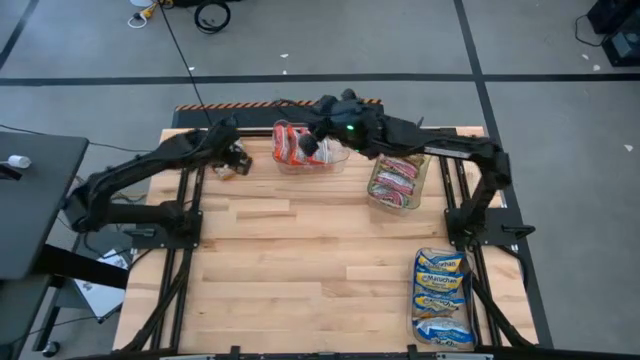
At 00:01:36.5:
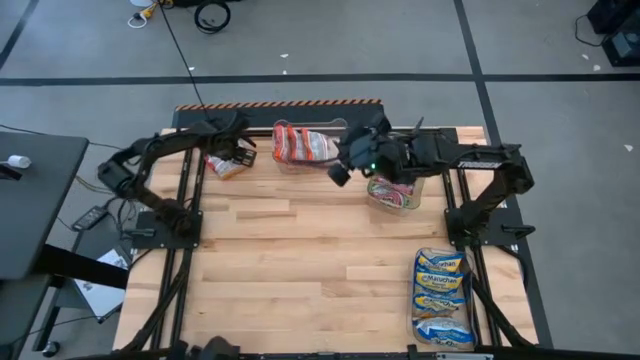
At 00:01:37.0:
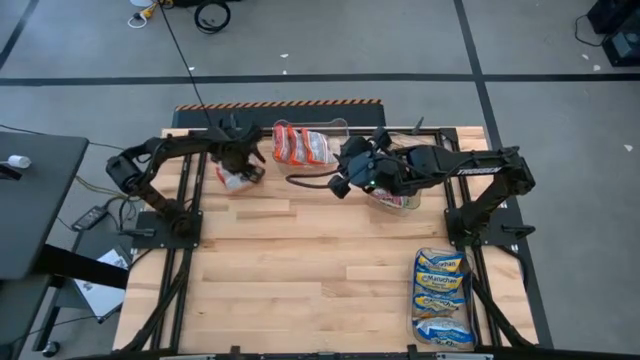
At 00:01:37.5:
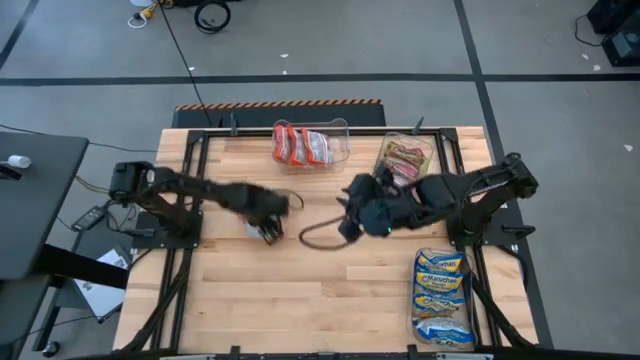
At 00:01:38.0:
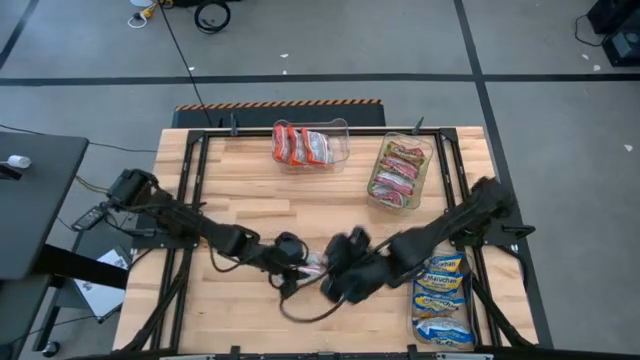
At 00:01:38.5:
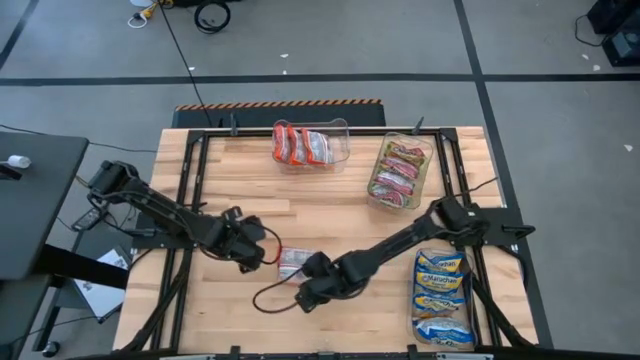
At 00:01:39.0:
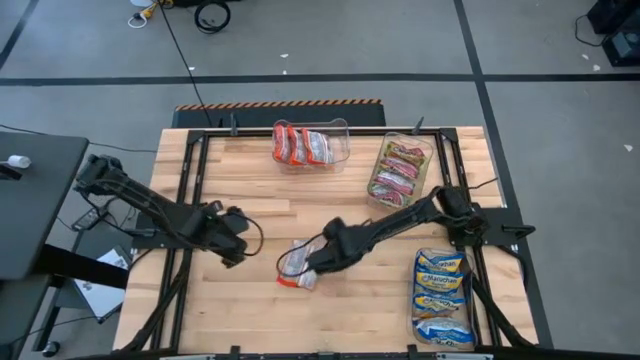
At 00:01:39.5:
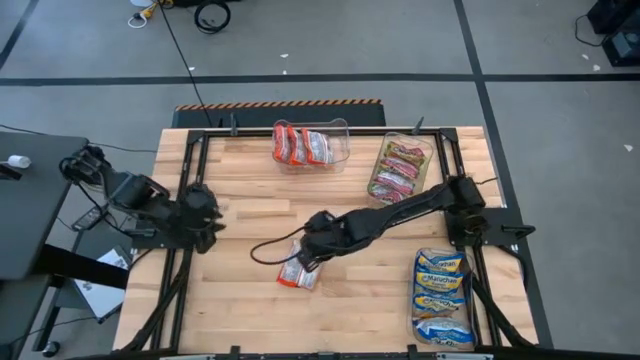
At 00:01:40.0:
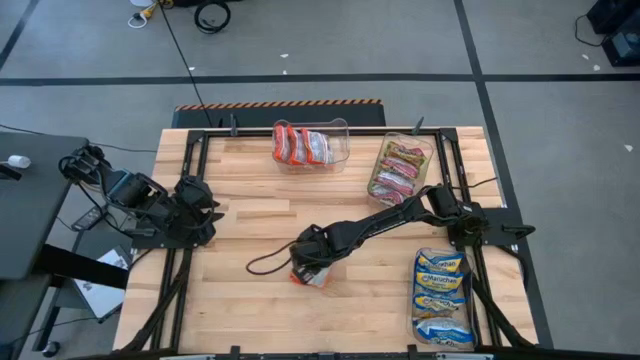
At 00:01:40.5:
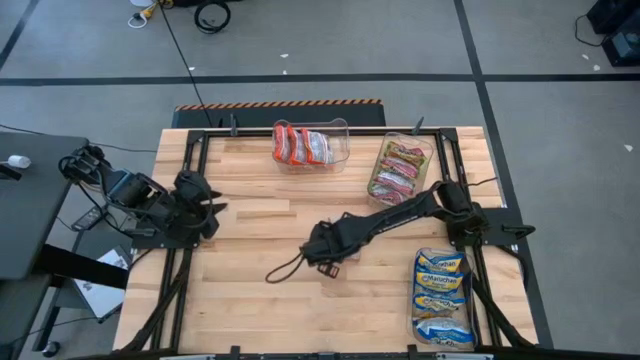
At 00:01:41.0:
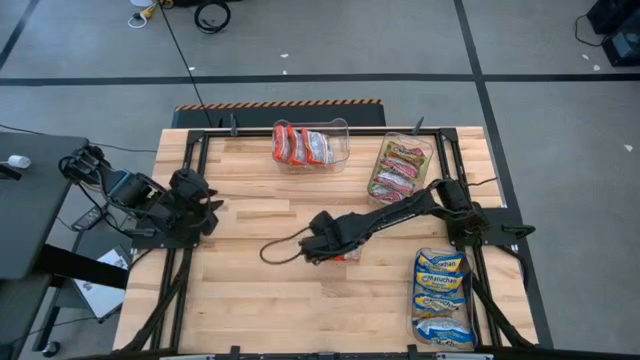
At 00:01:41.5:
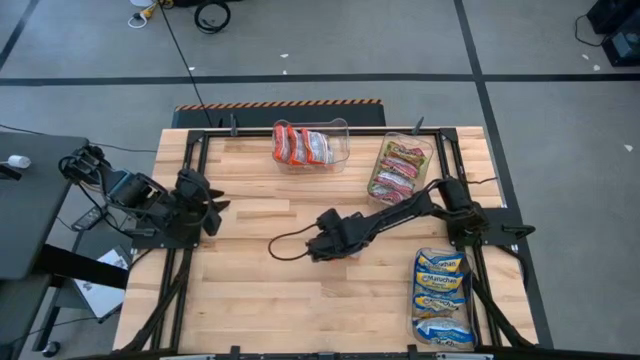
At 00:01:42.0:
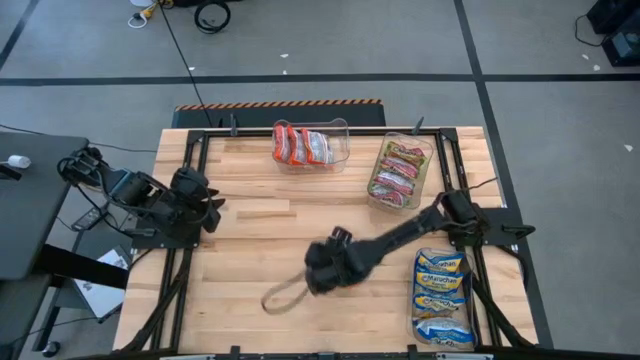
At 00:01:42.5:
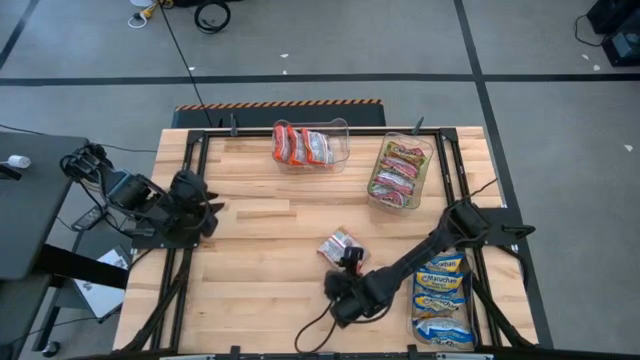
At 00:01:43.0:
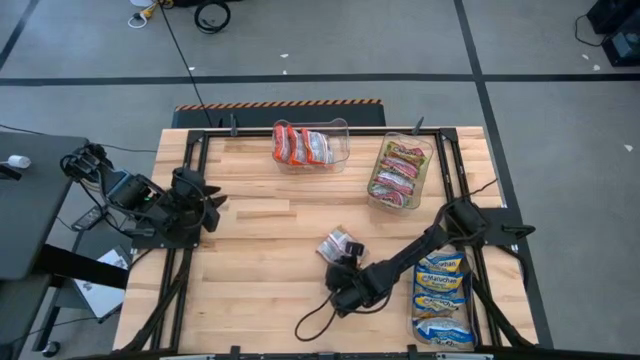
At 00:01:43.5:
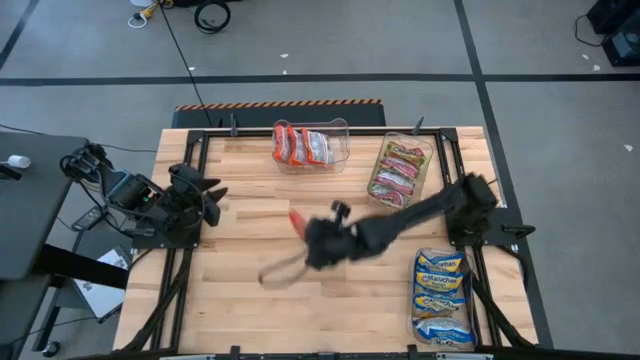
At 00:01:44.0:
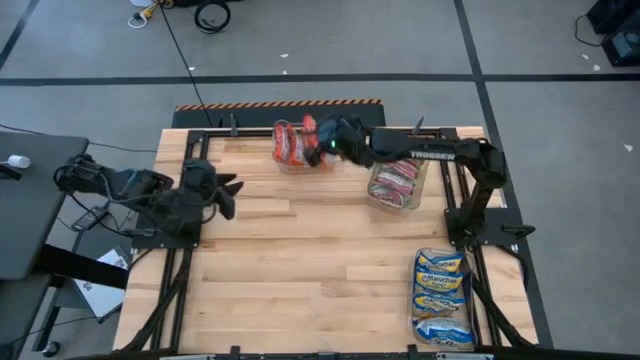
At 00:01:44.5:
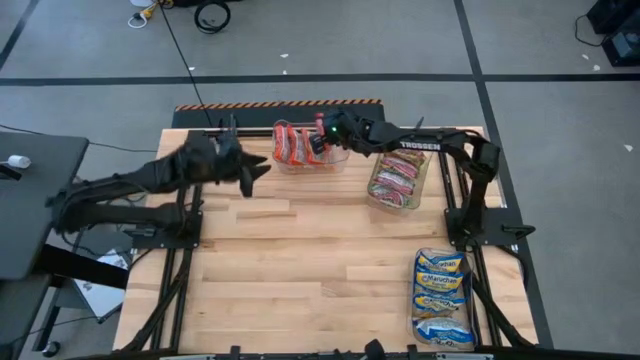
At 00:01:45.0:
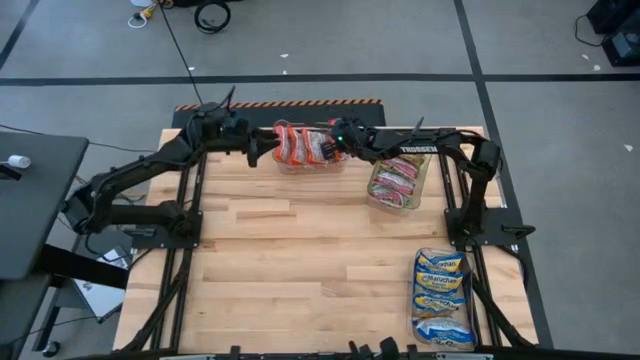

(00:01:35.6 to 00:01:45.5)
Task: Sort Maruchan noodles
Put the orange noodle pack into the top left transparent bin

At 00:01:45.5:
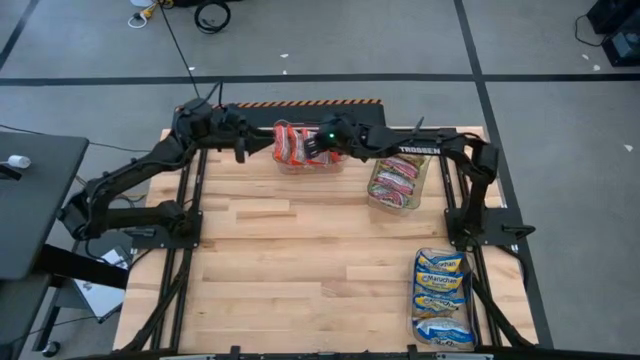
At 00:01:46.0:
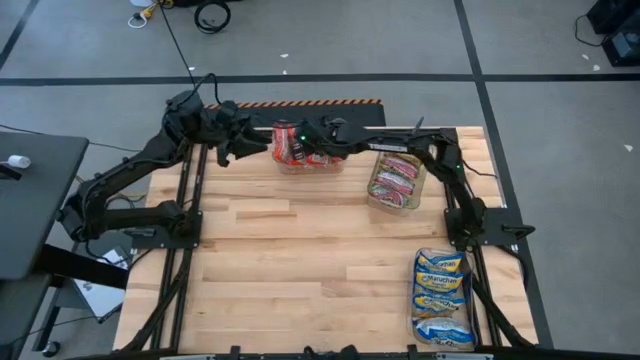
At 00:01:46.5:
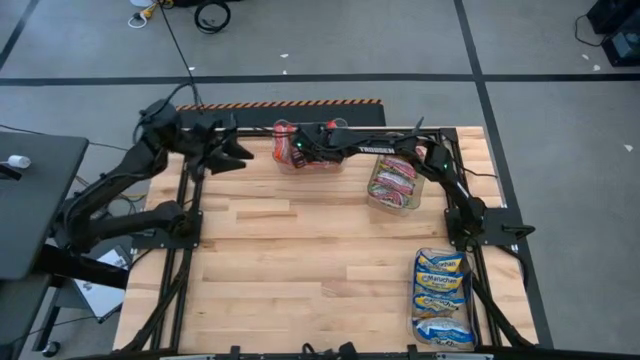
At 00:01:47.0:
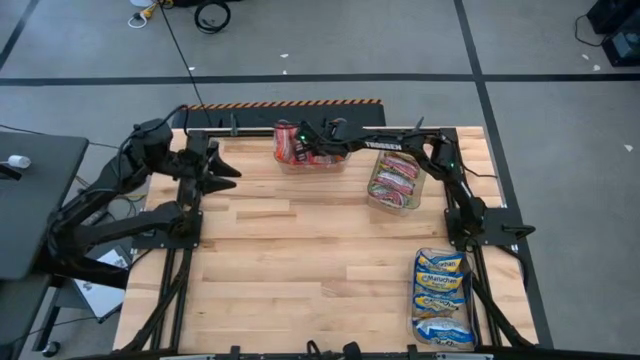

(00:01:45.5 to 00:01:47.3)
Adjust the orange noodle pack

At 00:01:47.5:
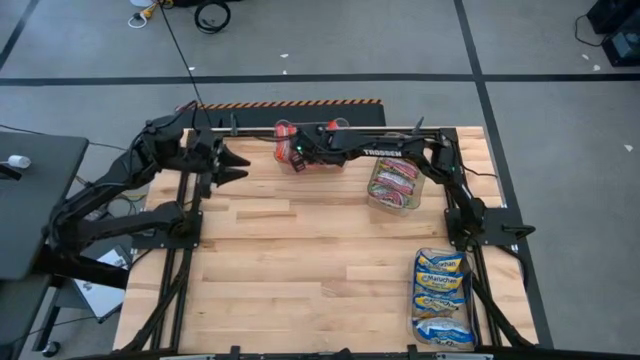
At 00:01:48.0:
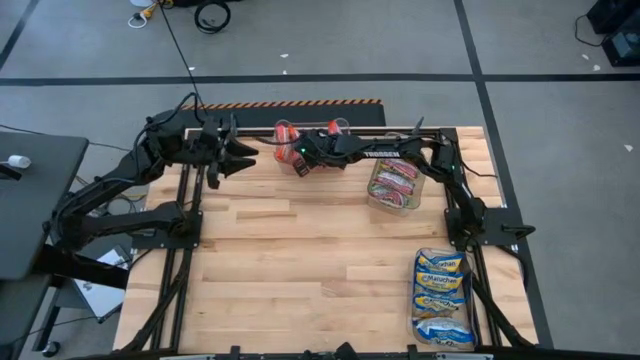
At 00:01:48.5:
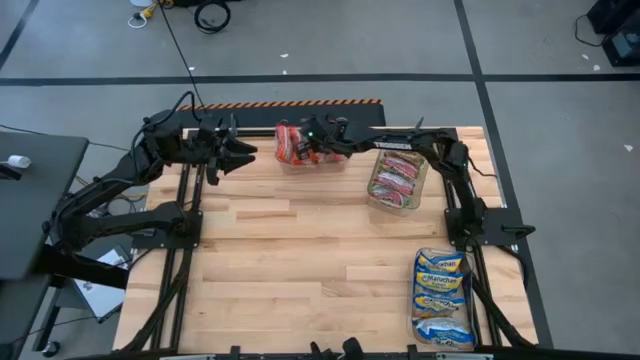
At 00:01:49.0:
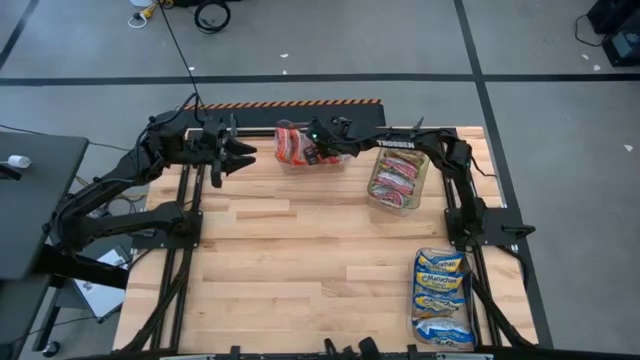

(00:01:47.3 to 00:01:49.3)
Adjust the orange noodle pack

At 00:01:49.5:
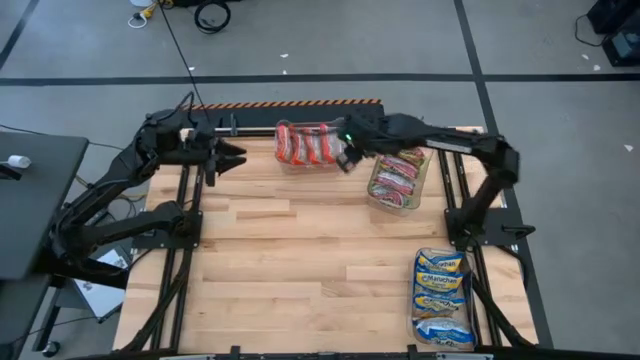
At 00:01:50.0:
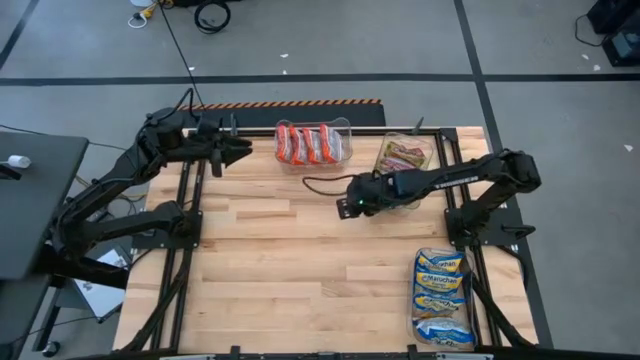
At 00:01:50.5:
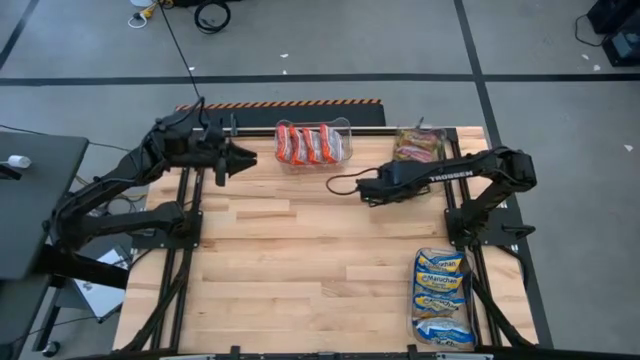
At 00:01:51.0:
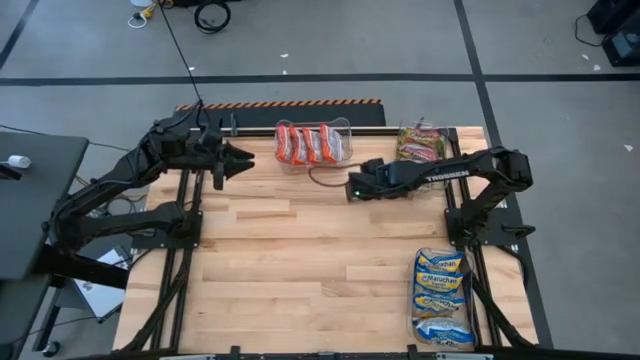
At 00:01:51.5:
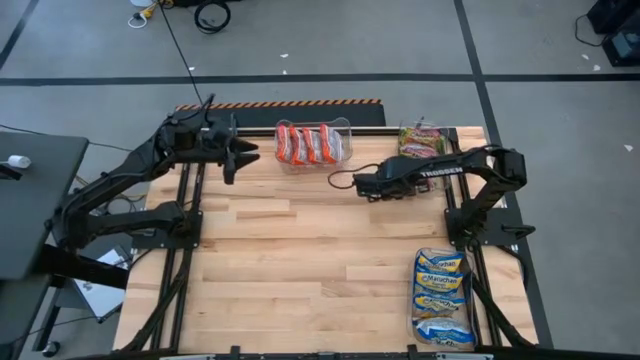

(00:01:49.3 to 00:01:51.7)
Adjust the top right transparent bin

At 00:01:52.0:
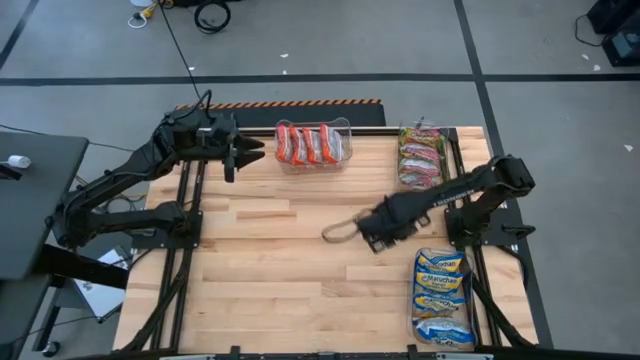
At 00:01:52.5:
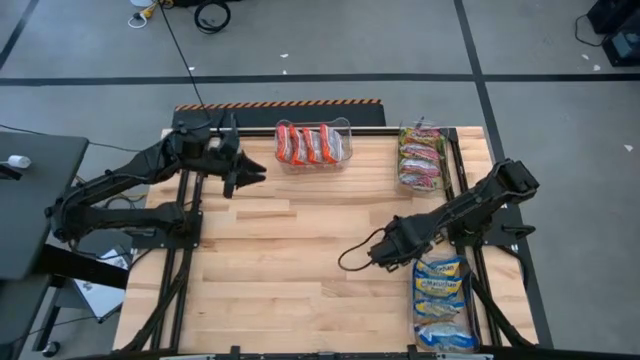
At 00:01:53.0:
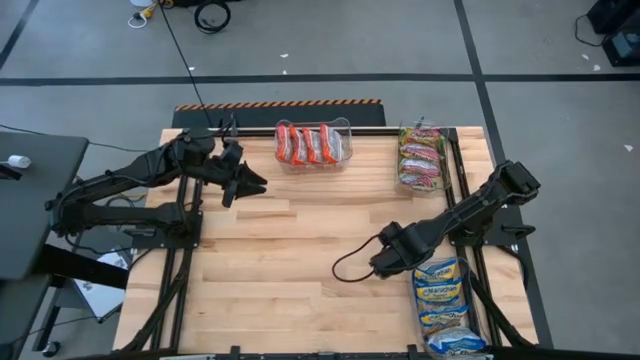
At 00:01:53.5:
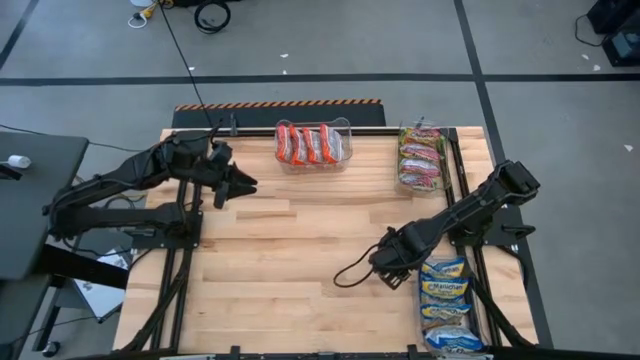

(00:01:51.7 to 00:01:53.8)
Adjust the bottom right transparent bin

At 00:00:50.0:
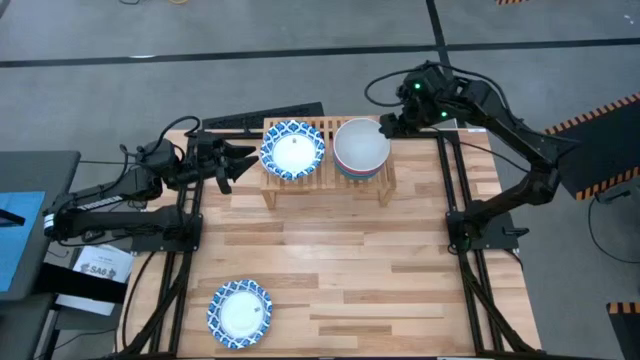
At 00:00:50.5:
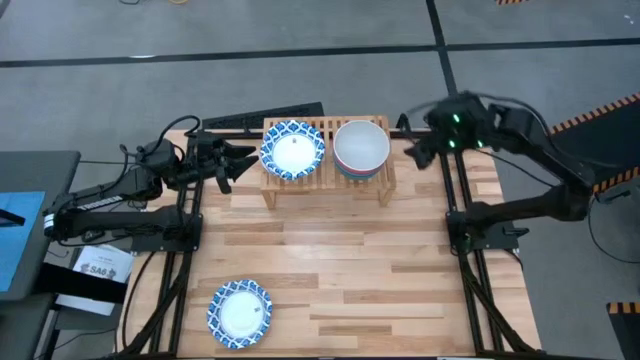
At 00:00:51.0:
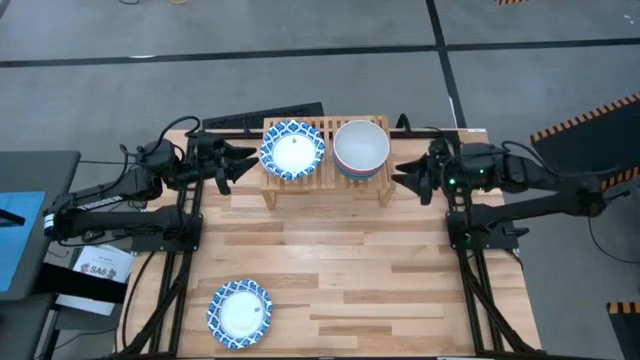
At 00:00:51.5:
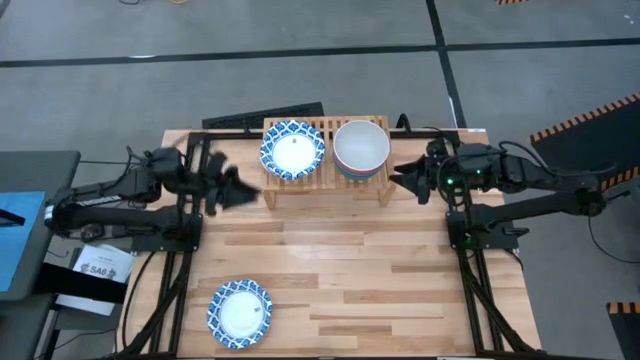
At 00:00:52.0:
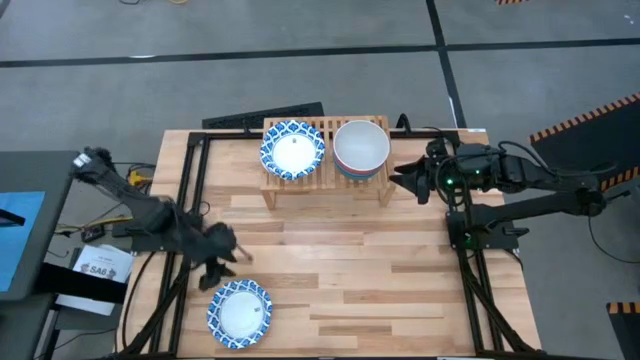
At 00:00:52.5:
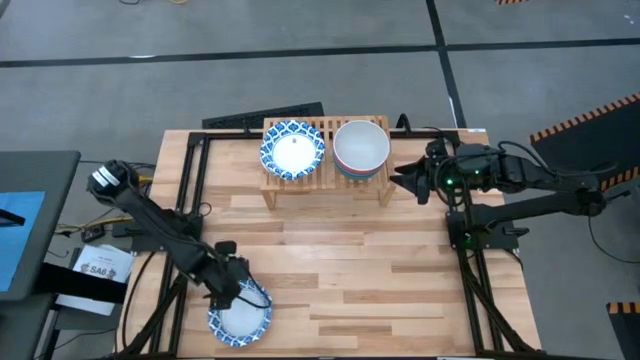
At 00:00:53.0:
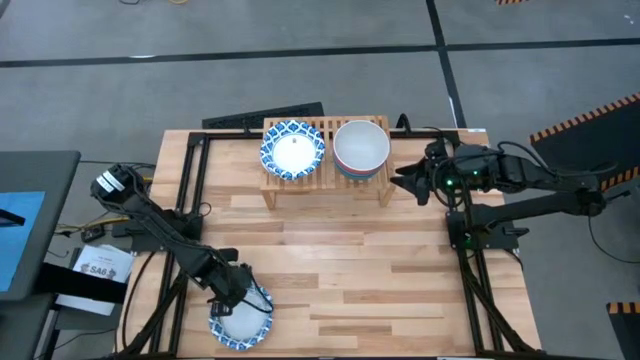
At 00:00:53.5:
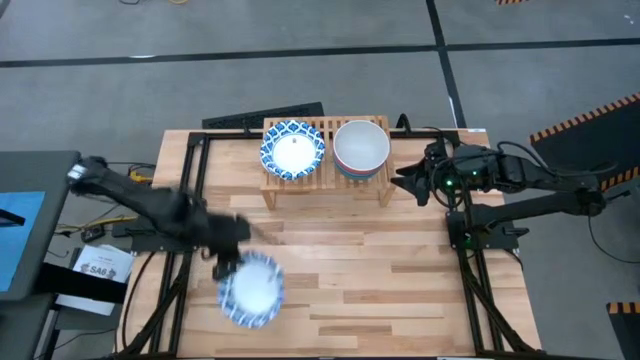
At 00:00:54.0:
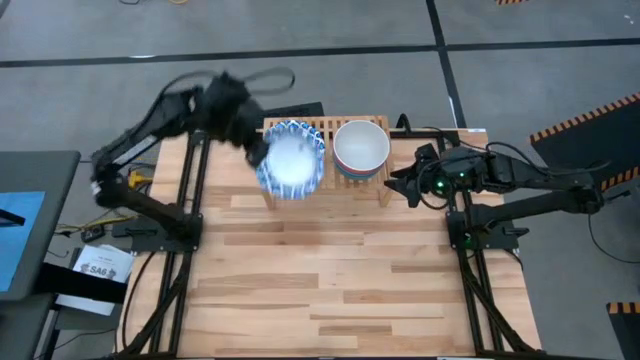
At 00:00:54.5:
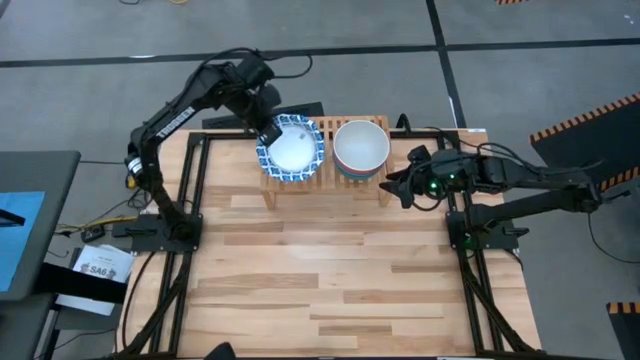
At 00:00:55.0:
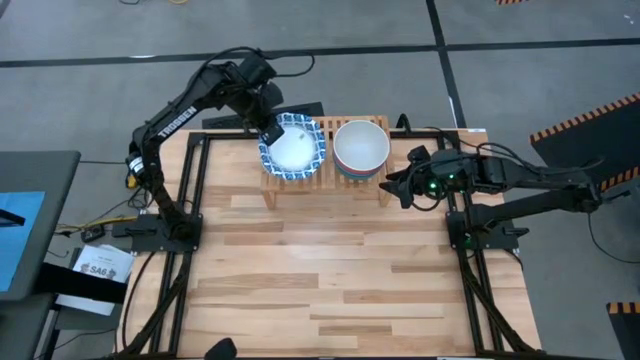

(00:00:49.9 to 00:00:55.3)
Task: Place and stack bowls onto a shelf
Stack the white blue bowl on top of the white blue bowl on the shelf
